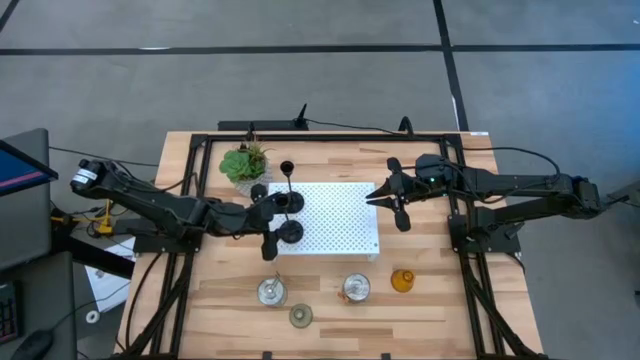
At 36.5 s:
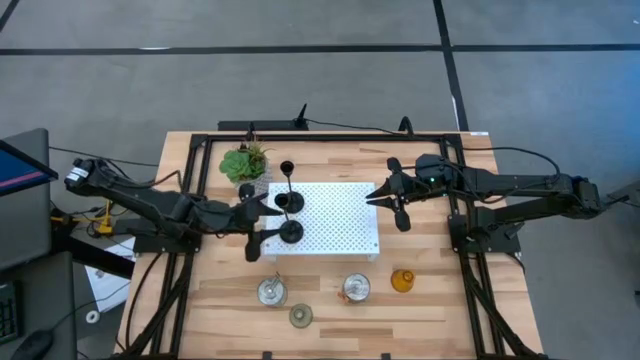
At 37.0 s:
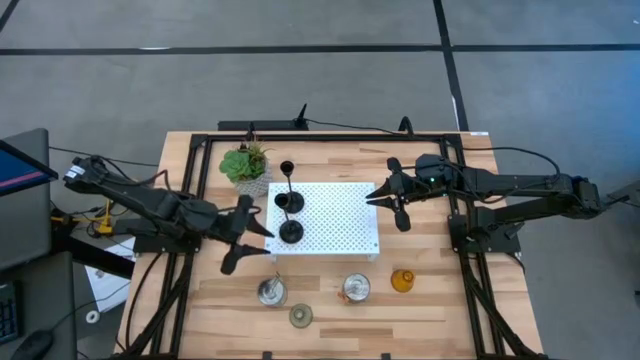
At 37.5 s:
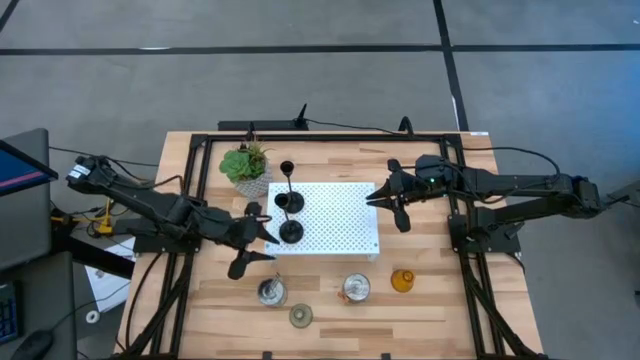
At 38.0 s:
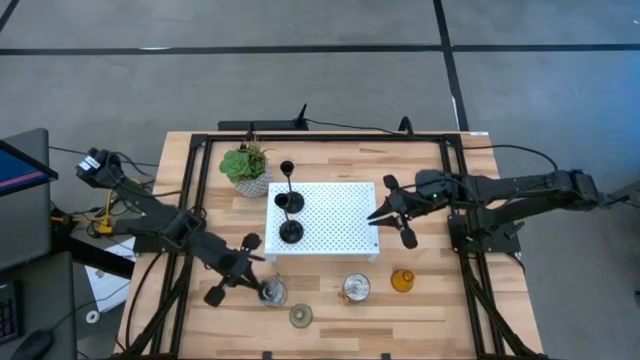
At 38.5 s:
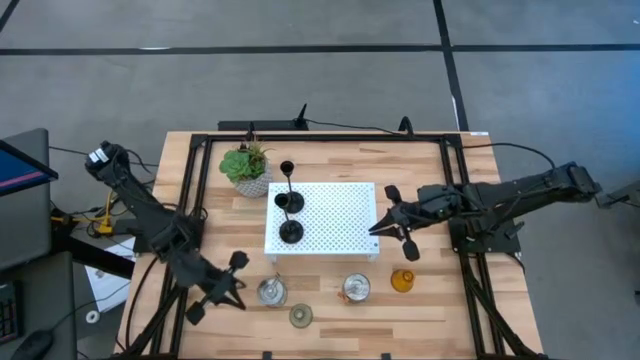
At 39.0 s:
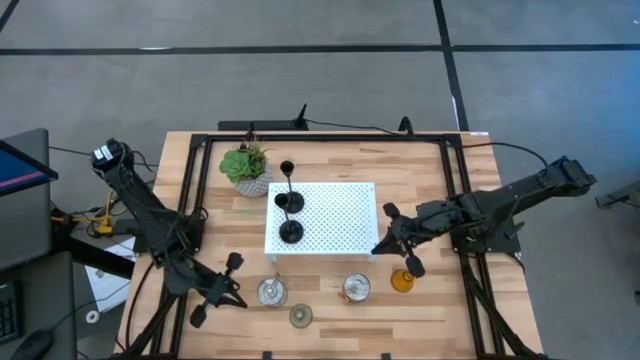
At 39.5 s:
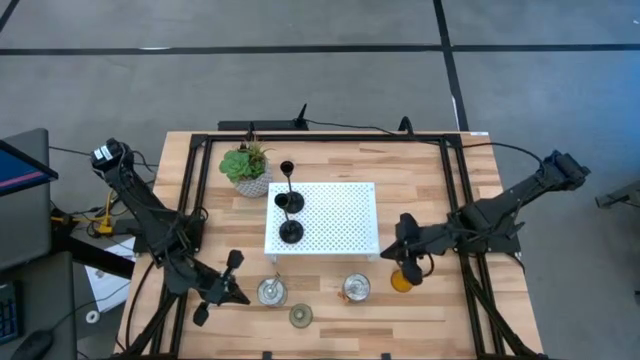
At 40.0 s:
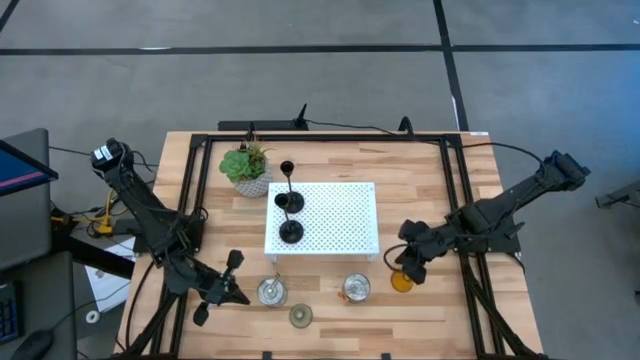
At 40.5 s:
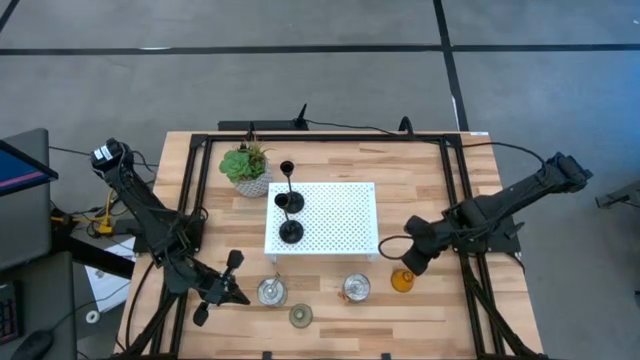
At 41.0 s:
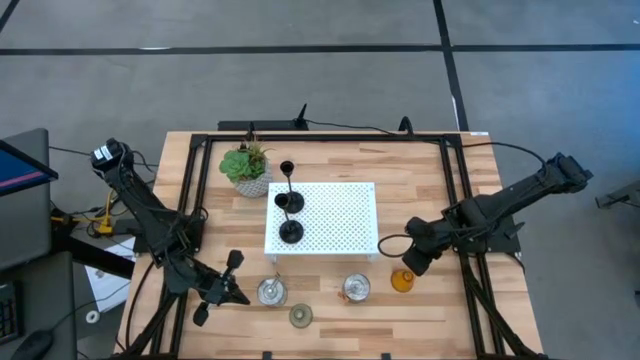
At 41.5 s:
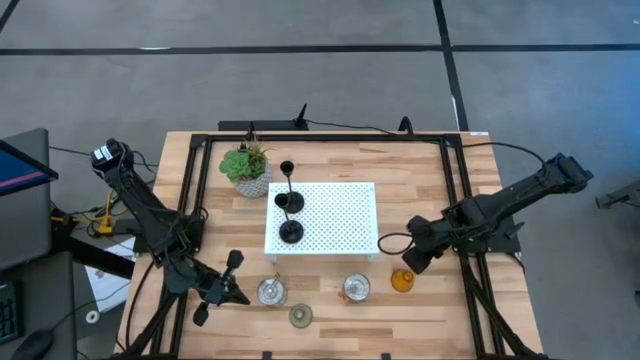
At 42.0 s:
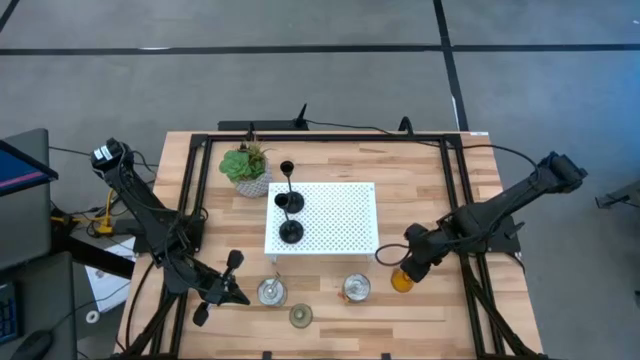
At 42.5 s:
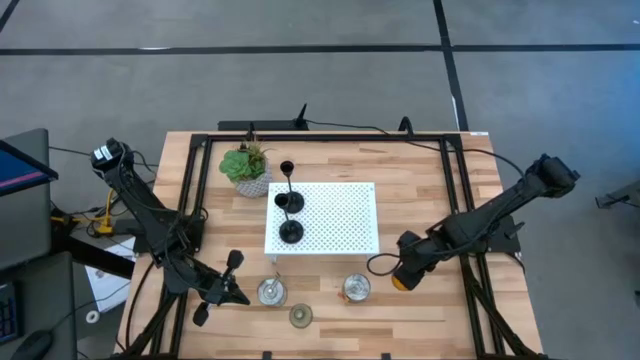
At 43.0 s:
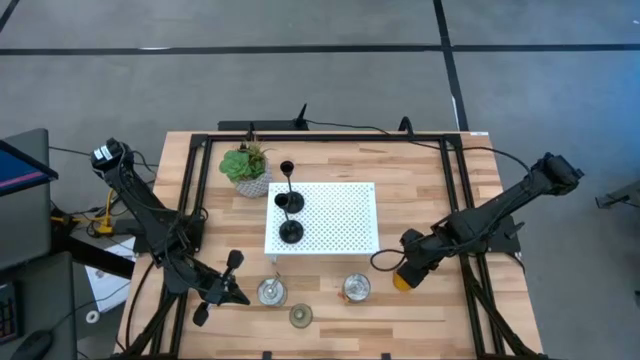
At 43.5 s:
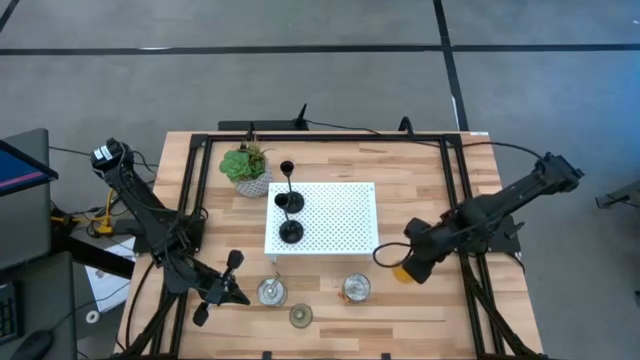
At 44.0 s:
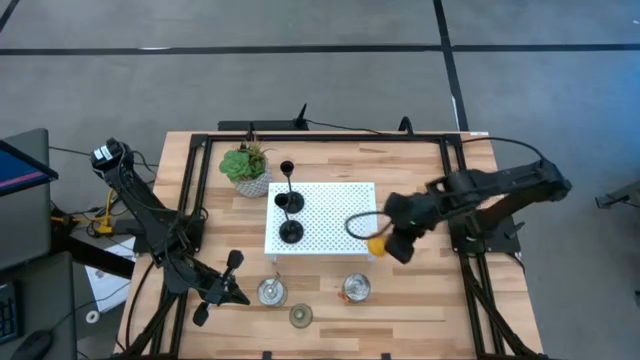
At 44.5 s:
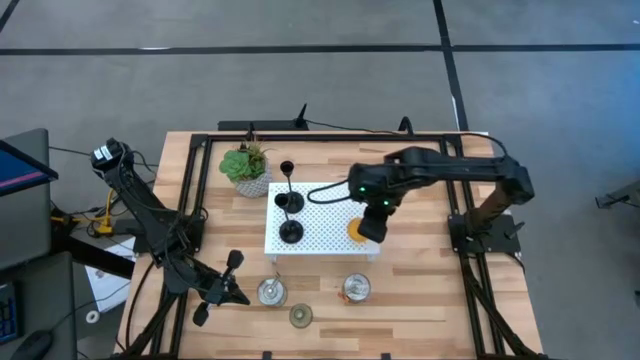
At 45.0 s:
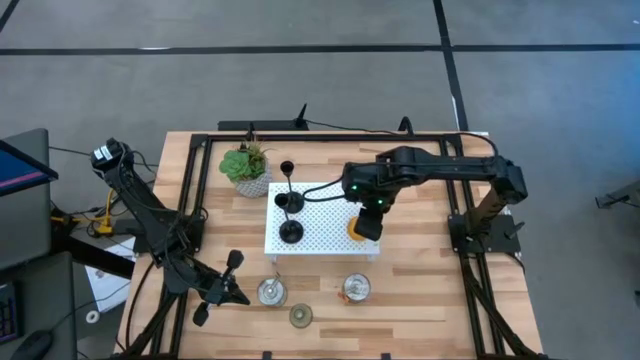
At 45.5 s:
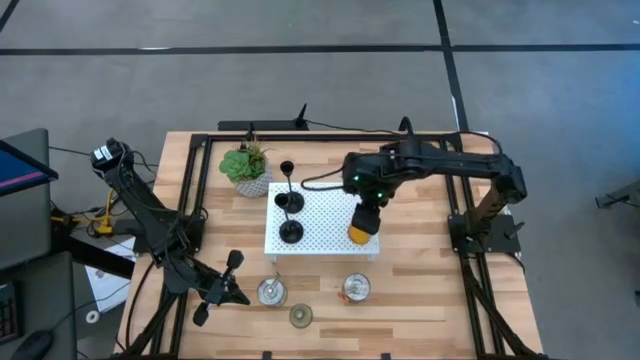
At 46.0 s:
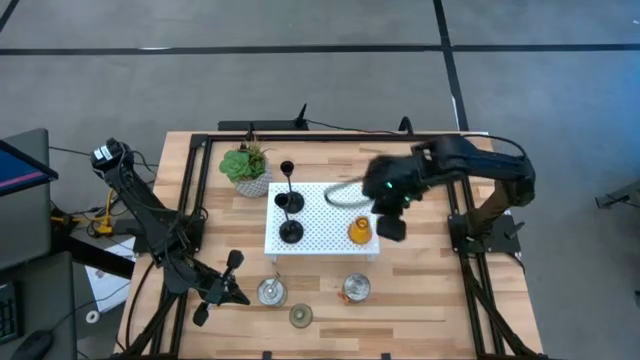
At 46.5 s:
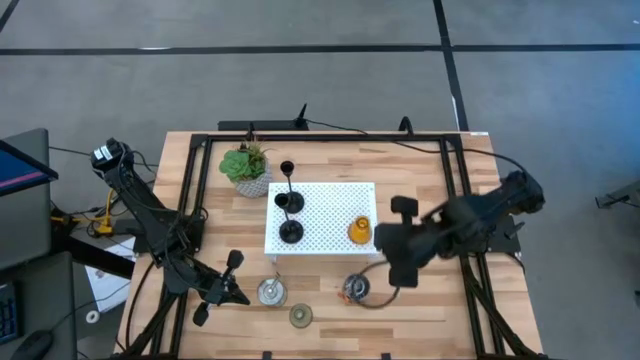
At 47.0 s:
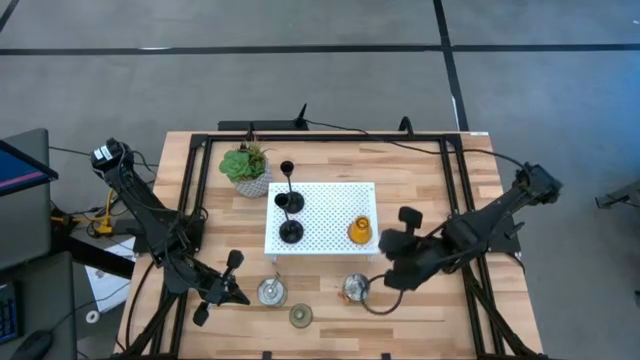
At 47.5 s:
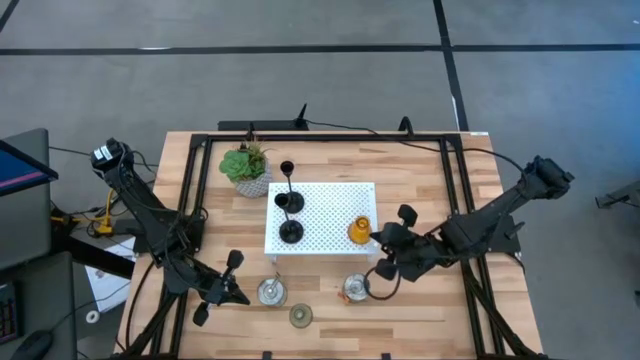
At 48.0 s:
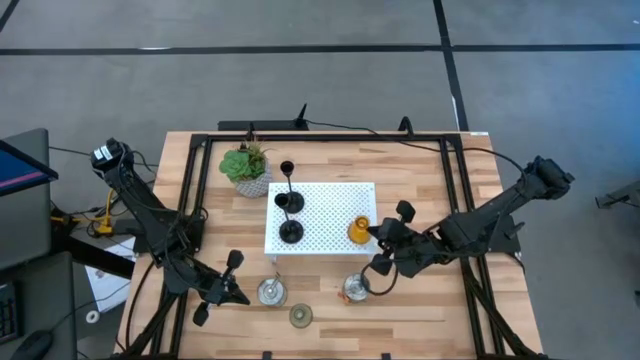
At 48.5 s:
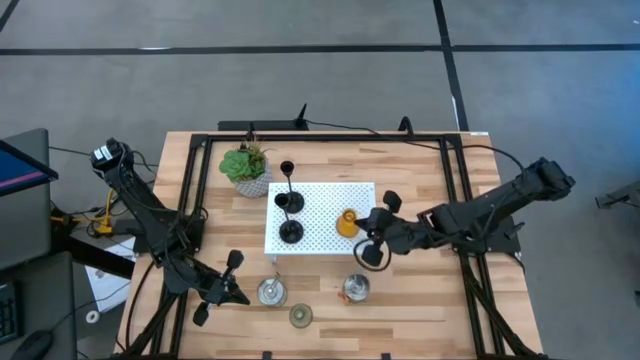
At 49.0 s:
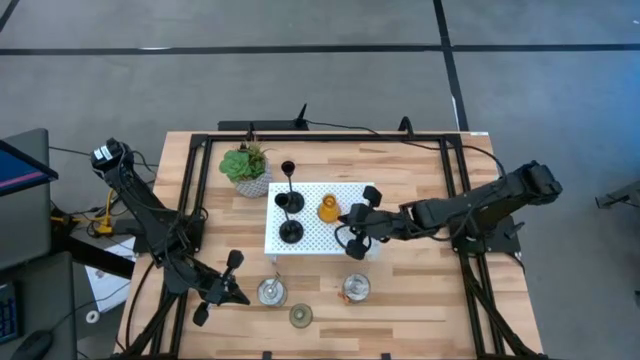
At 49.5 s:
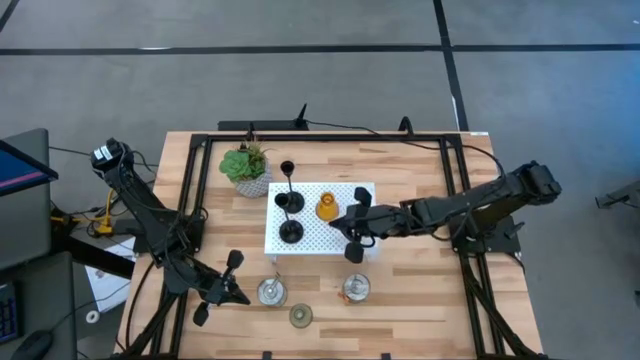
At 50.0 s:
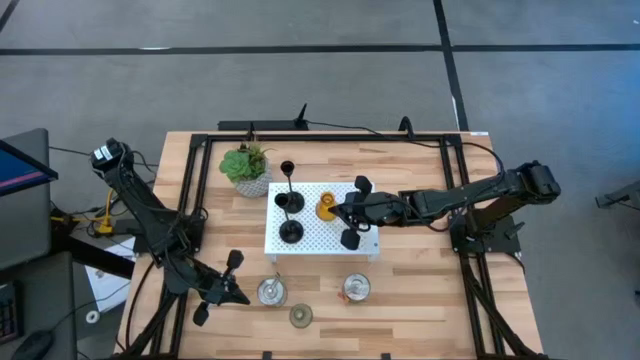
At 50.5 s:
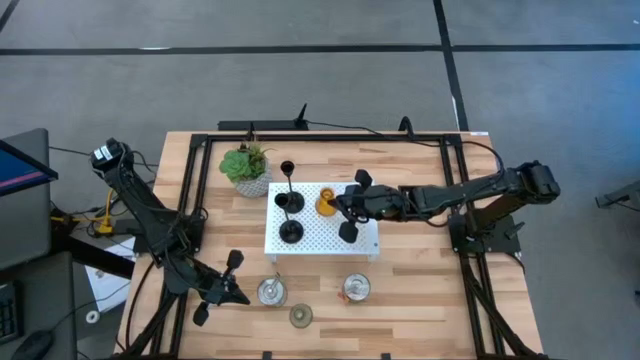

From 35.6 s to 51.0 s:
Task: Pick & Place candle stick holders
Put the yellow glass candle holder on the shelf
